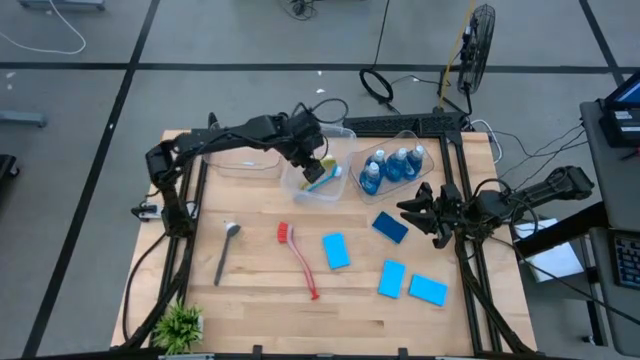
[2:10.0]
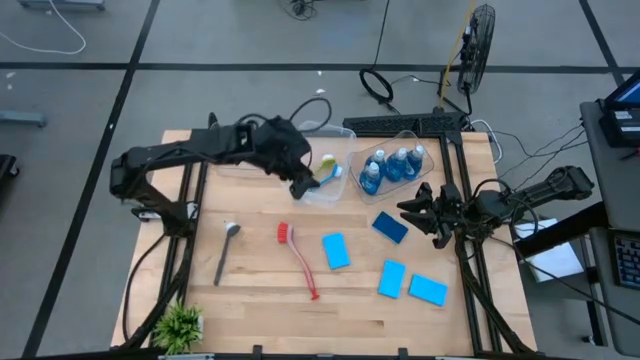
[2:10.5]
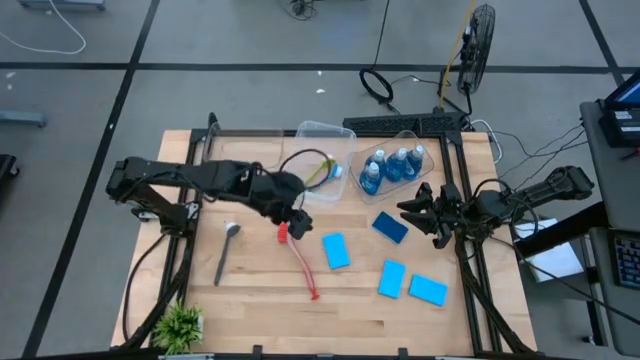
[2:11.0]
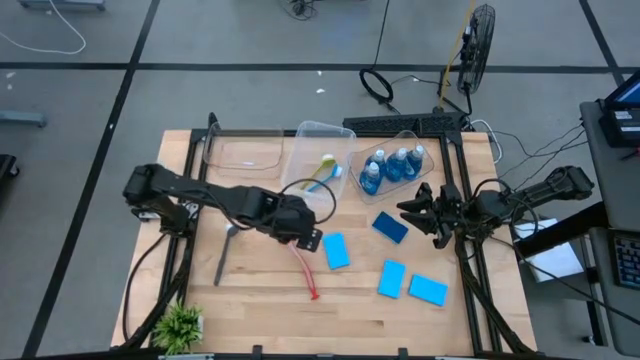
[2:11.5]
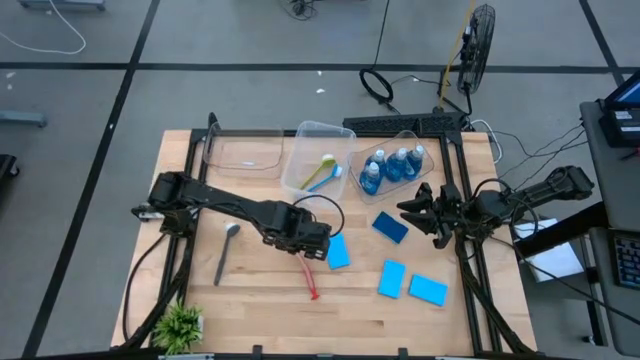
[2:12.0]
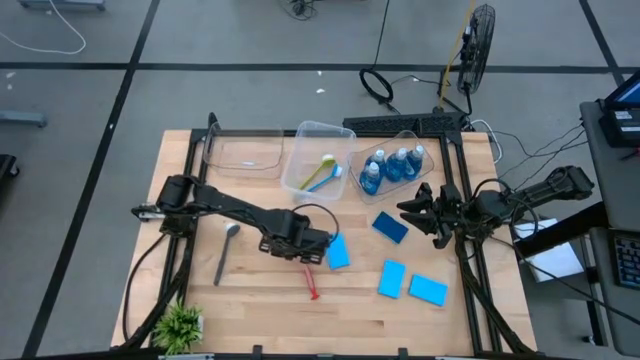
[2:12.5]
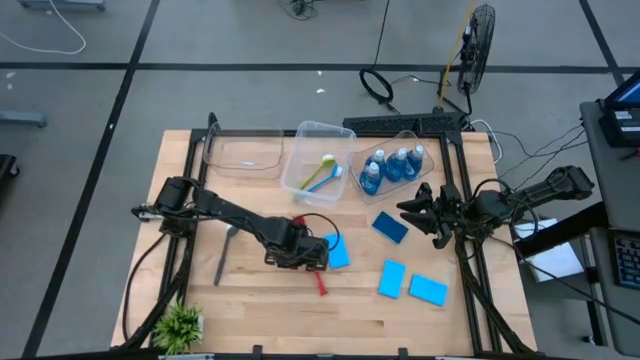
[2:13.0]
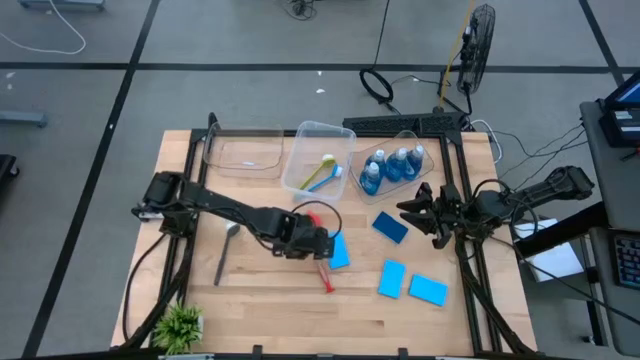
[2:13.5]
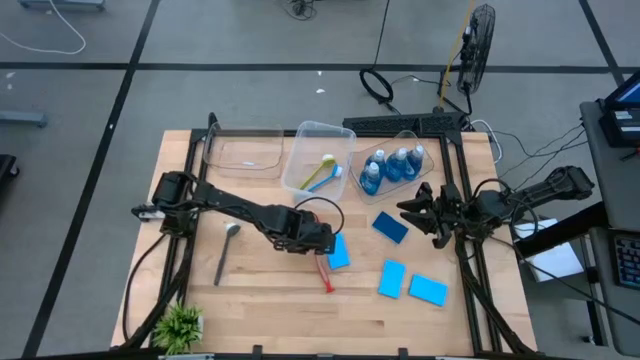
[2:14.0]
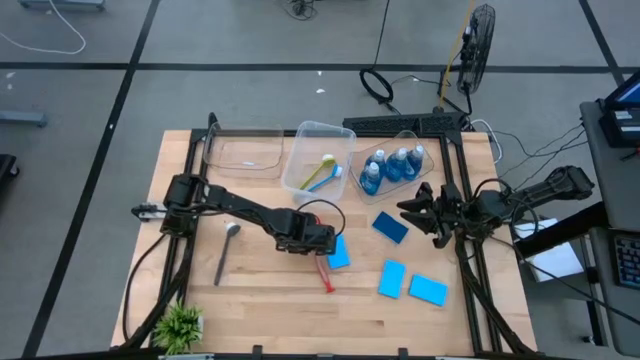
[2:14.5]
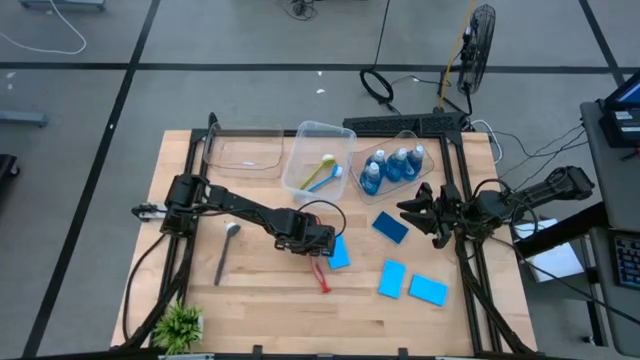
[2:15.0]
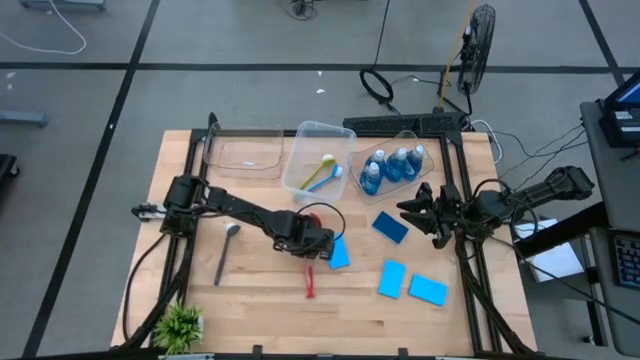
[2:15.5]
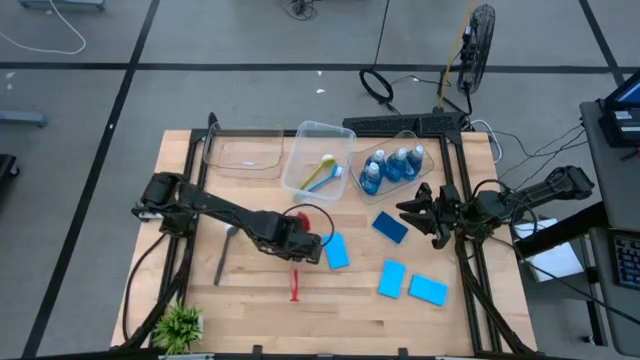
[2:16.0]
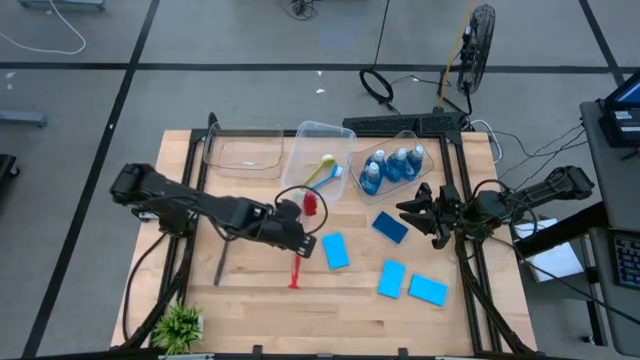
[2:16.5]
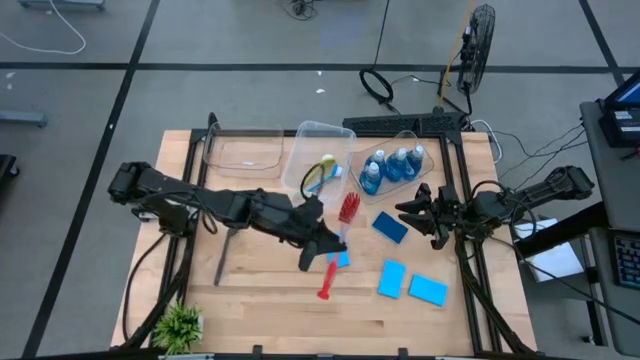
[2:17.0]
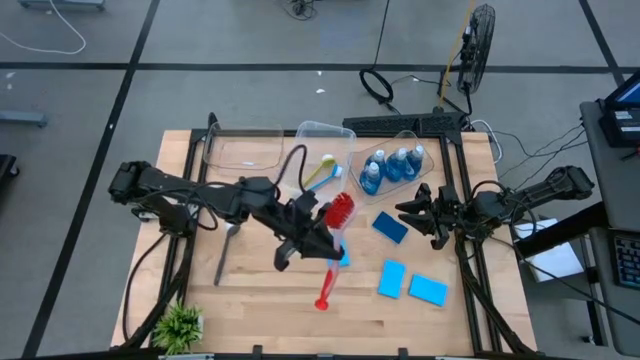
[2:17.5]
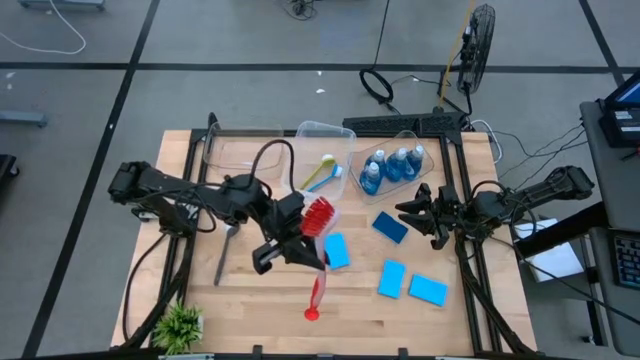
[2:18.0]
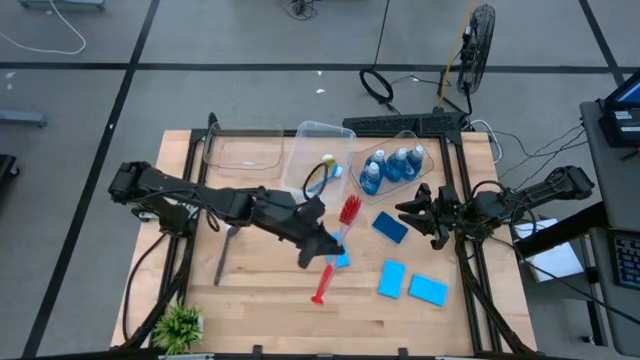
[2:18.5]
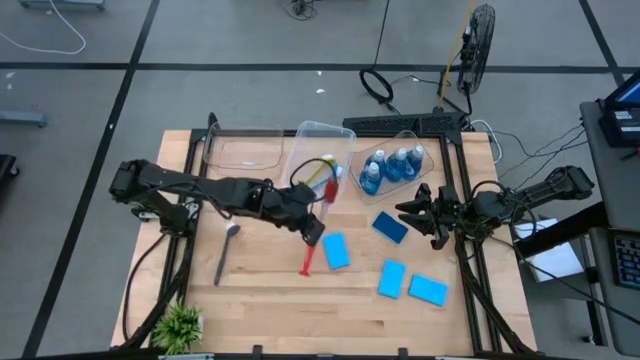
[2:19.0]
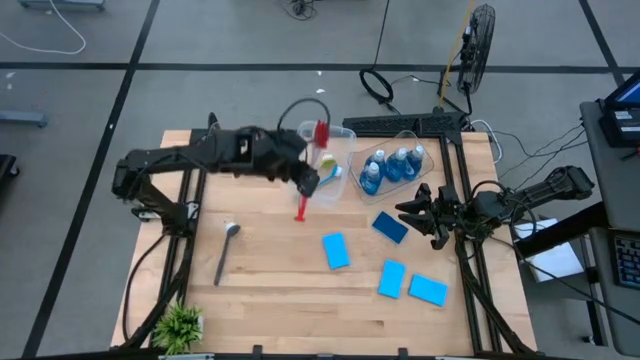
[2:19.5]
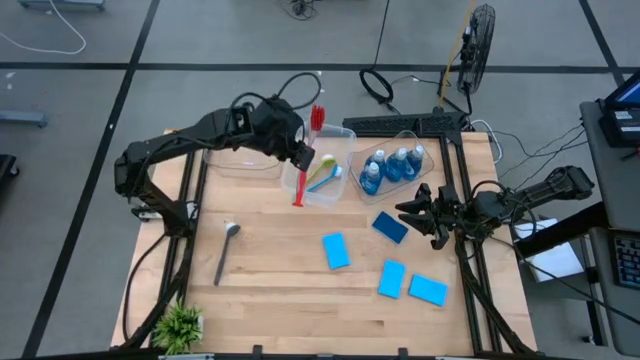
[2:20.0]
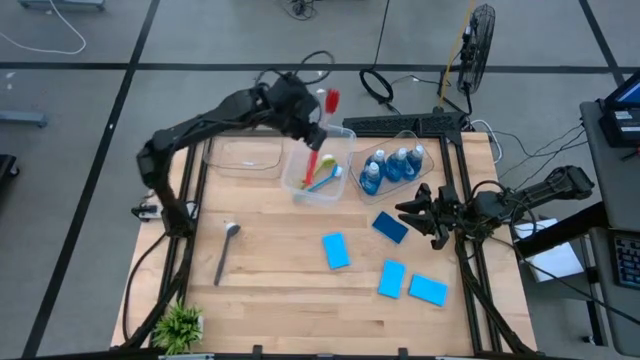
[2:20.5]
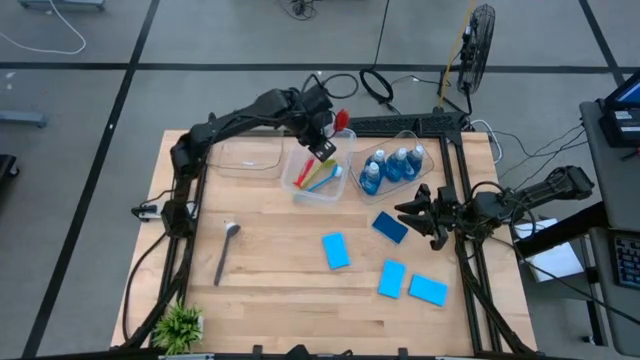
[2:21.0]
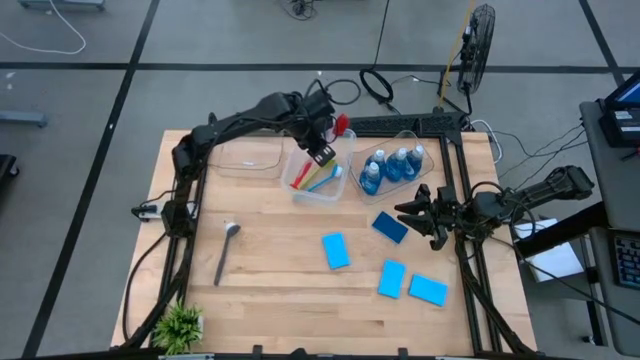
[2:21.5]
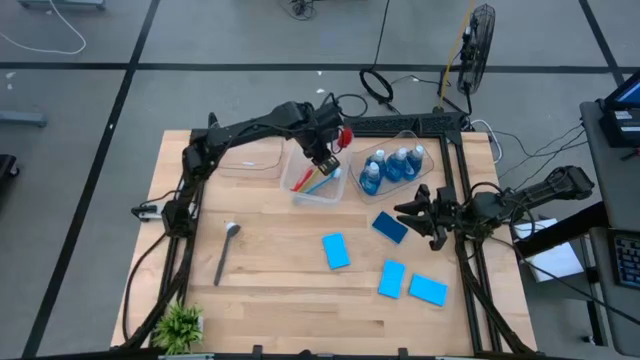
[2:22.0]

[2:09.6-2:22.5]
Task: Pick & Place Kitchen Sink Supplies
Put the red dish brush into the transparent container

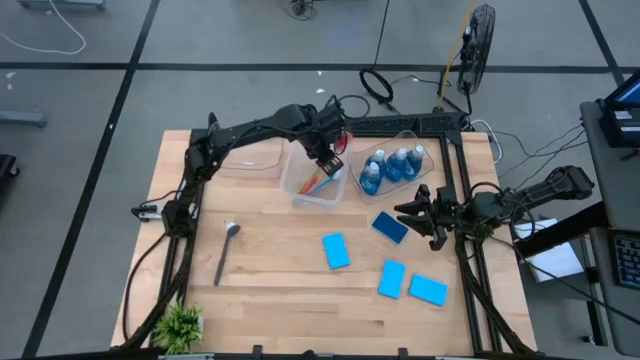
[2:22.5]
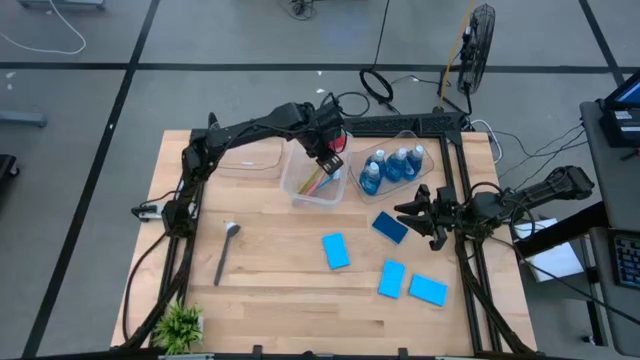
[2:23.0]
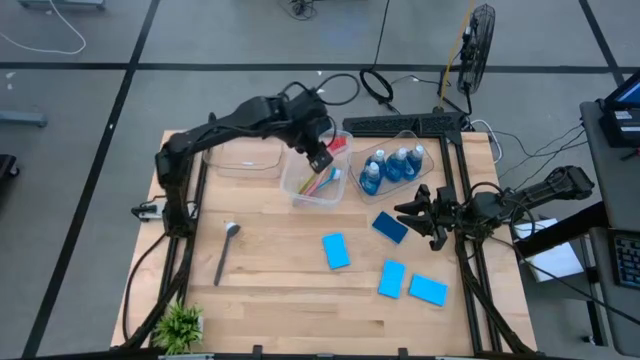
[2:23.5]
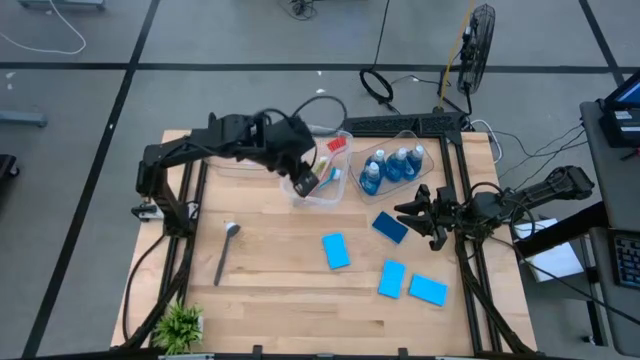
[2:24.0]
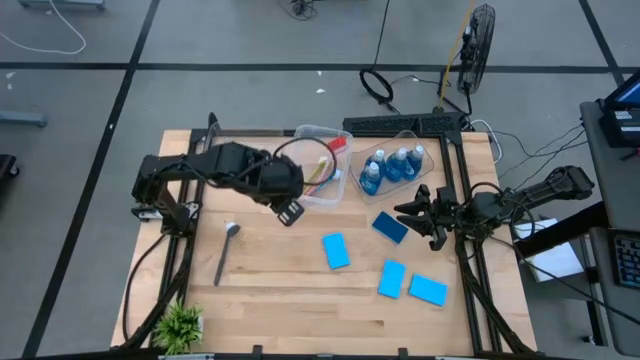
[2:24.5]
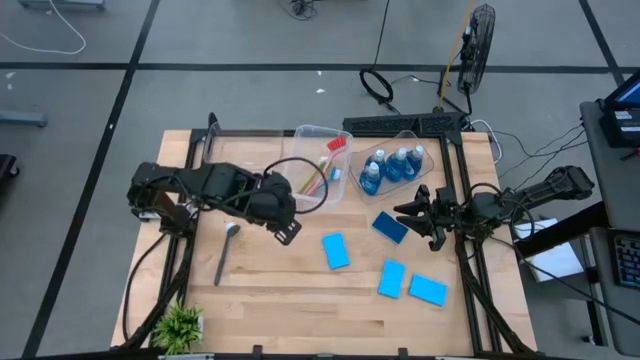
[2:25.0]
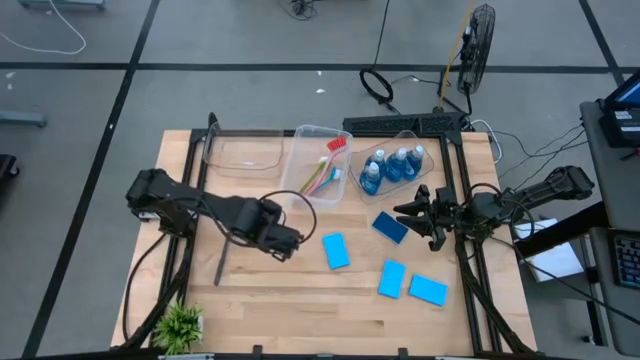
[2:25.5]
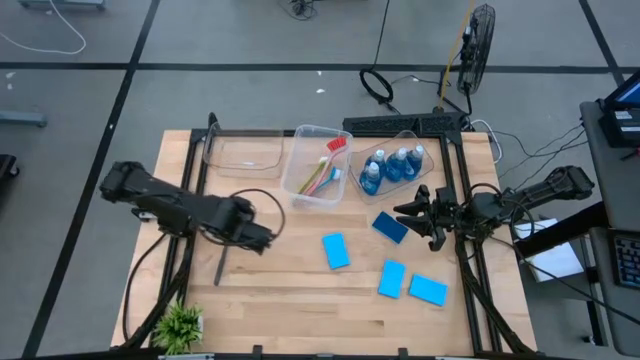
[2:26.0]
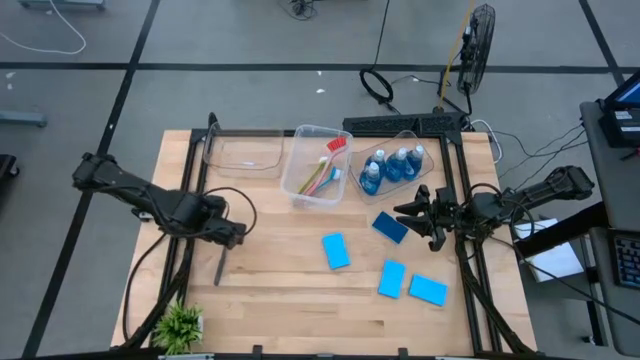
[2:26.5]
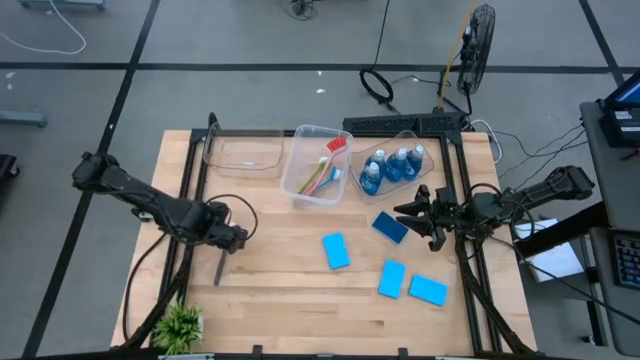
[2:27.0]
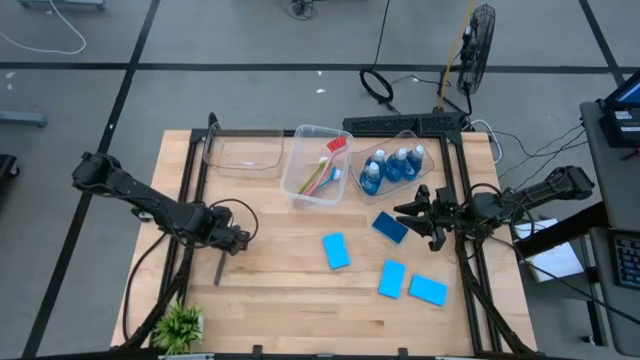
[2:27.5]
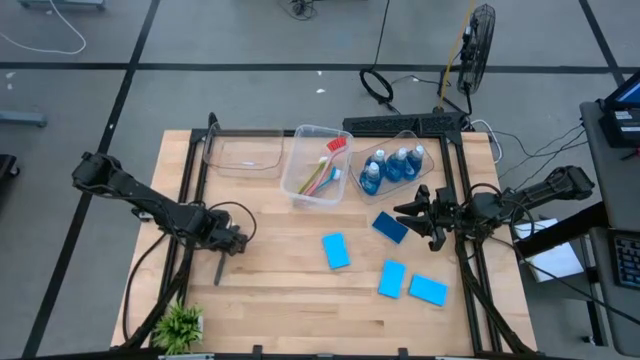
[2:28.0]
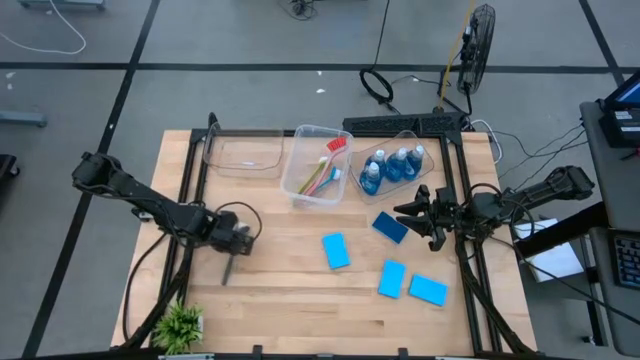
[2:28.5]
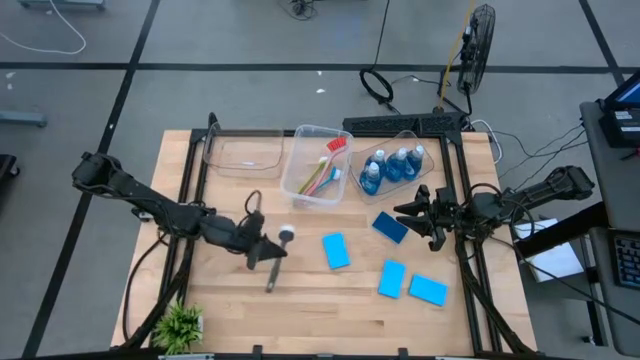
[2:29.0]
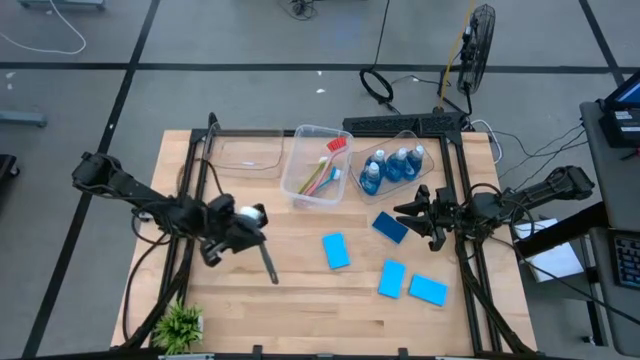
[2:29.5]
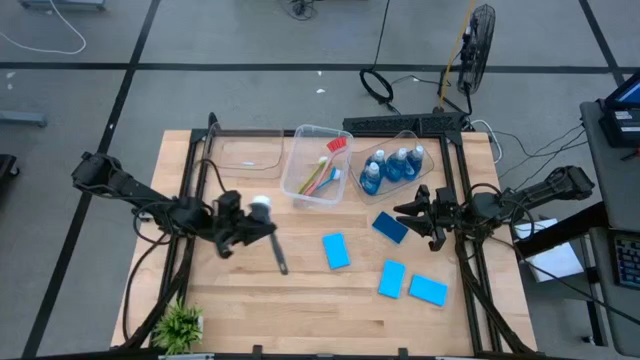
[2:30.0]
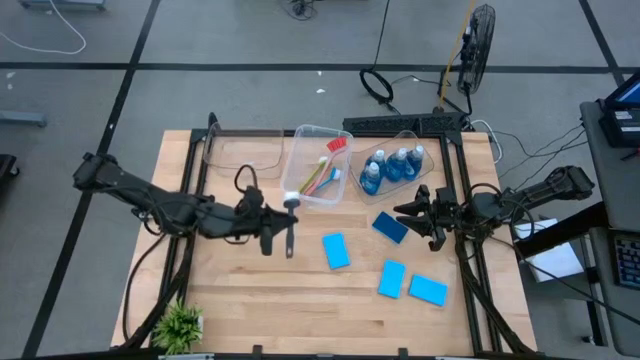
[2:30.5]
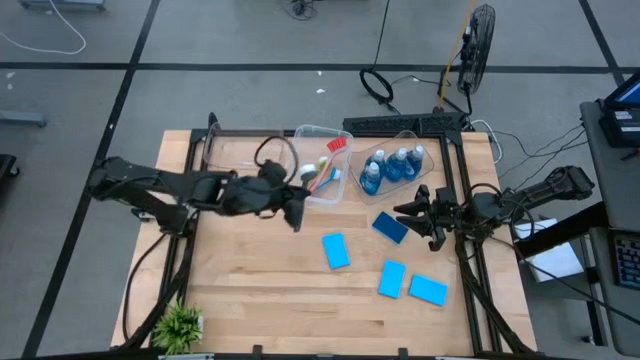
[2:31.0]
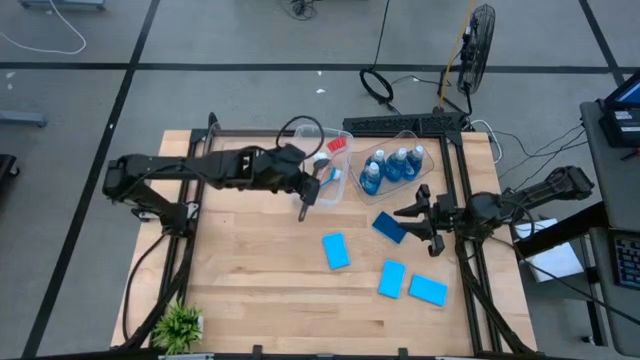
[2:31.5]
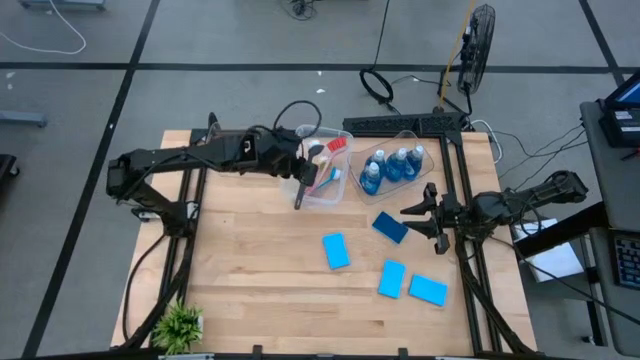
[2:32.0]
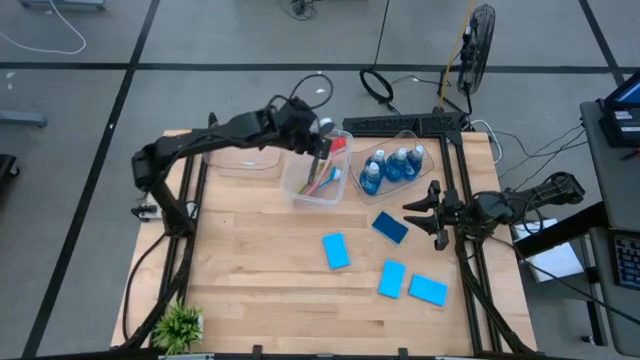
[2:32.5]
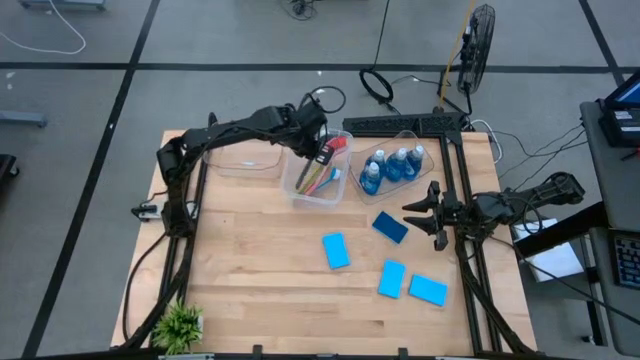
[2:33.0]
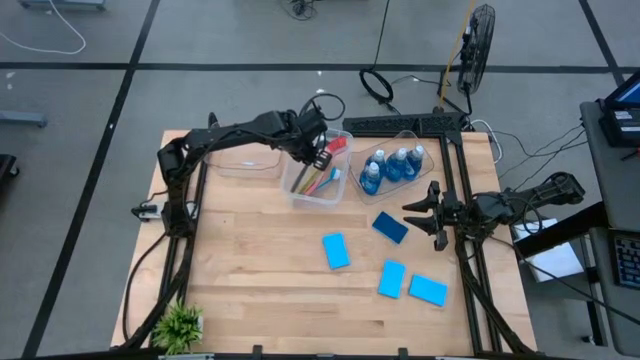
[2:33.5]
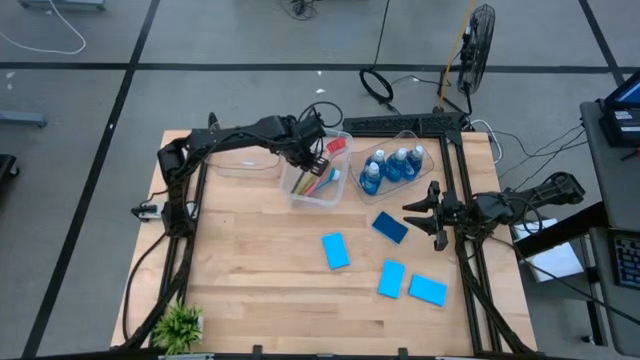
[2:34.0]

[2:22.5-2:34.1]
Put the gray dish brush into the transparent container
